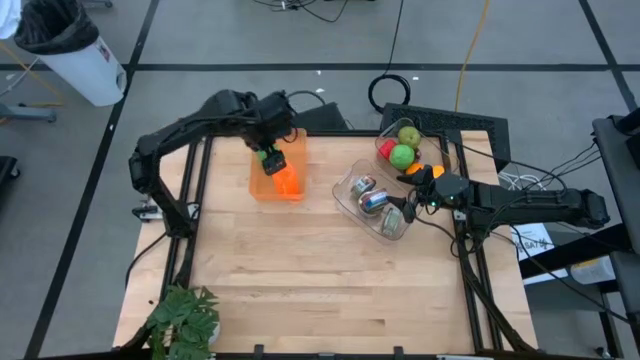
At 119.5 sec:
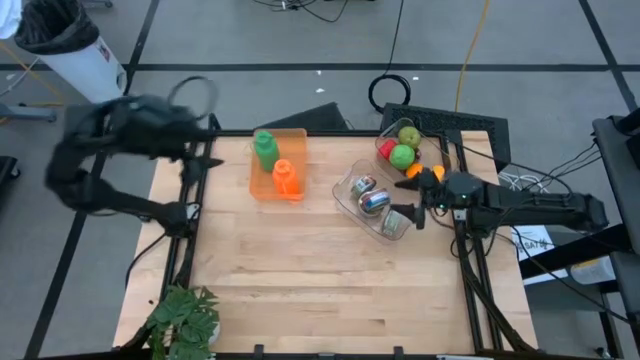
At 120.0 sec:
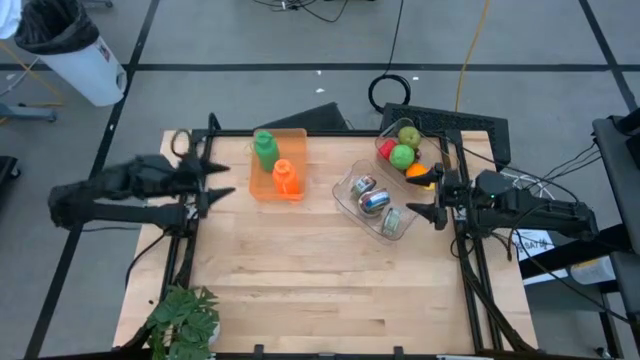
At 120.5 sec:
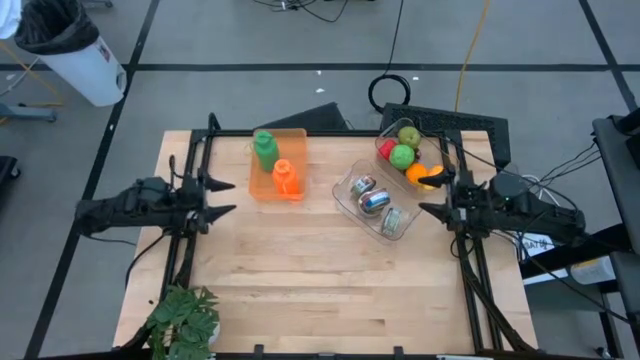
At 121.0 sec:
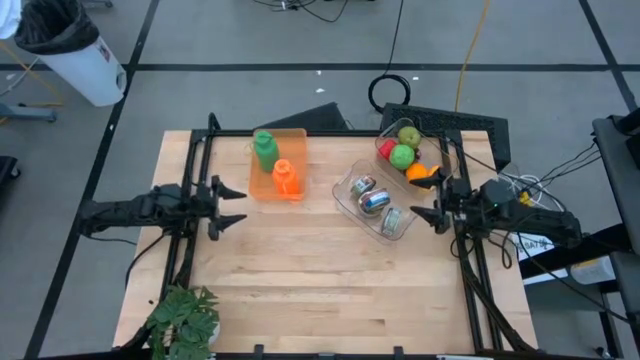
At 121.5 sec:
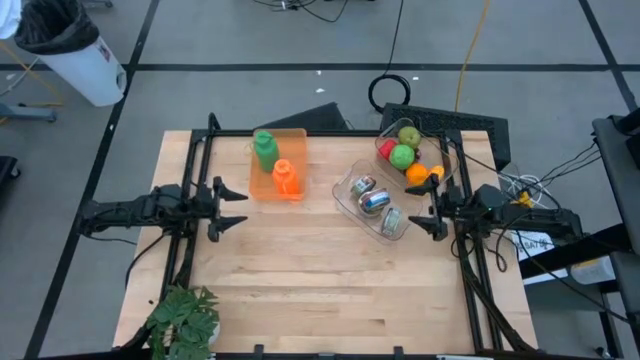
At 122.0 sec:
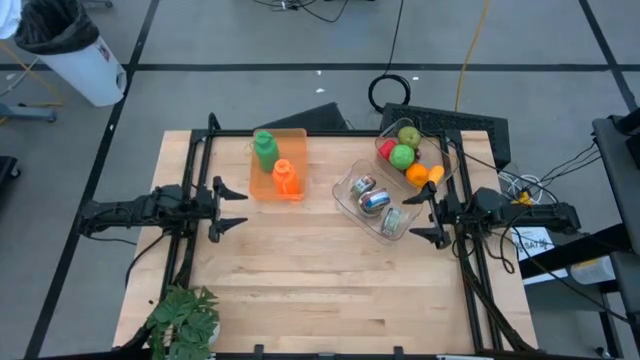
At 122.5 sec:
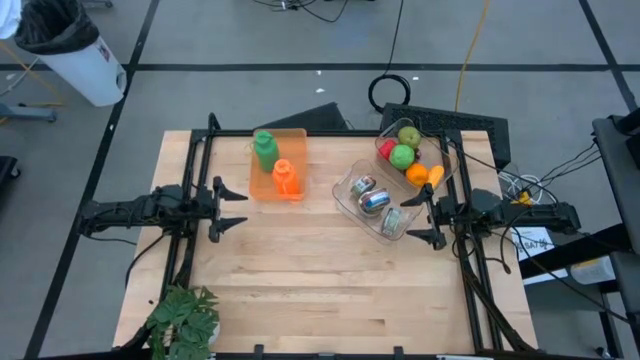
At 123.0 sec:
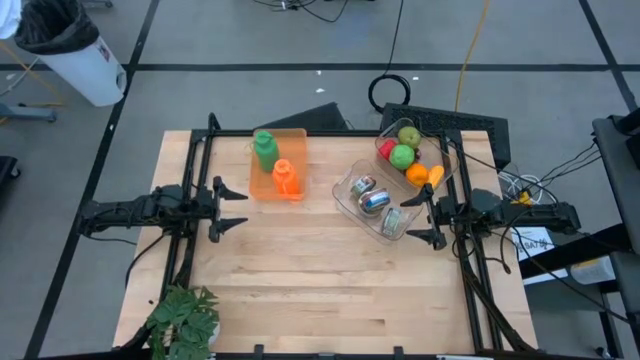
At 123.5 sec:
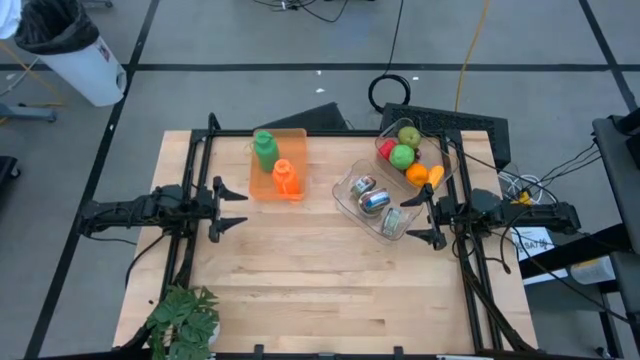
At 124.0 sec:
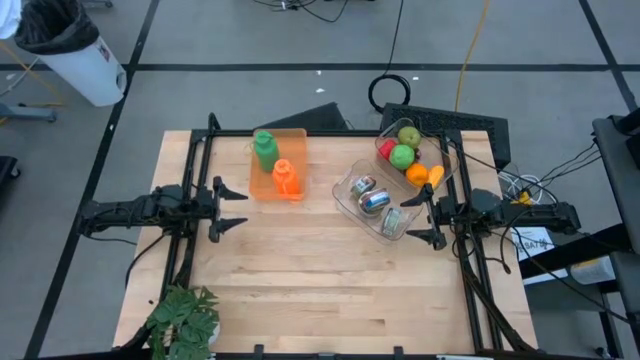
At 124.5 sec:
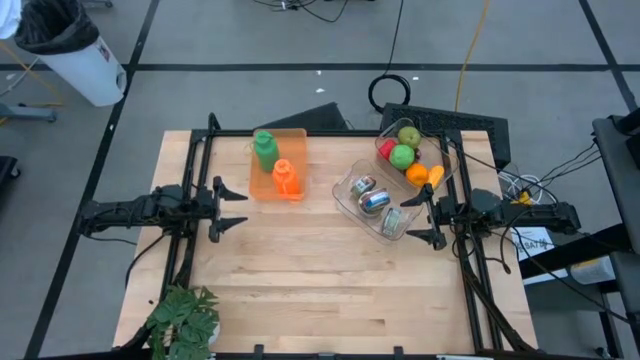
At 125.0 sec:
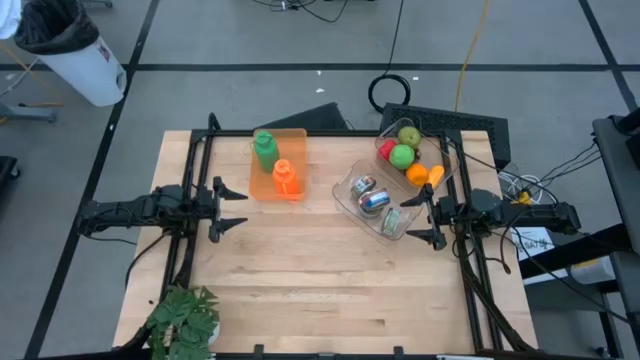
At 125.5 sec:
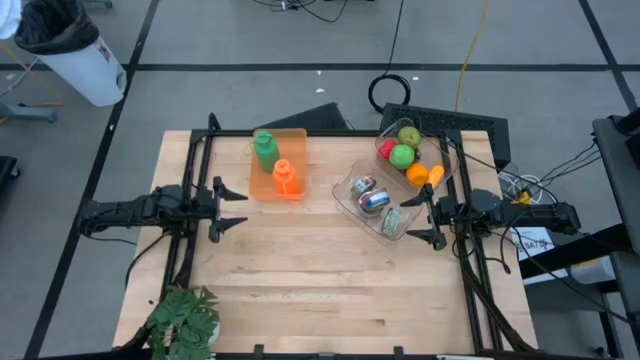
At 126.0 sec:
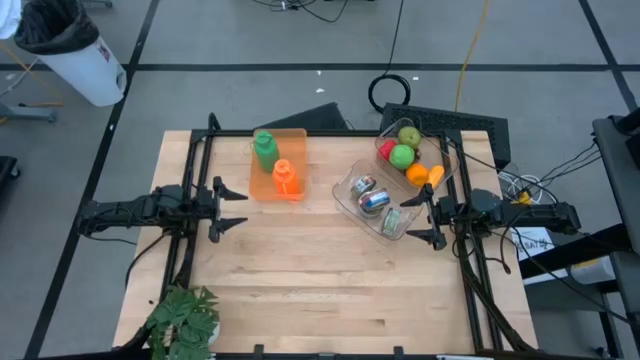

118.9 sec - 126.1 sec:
Task: Pick & Place Food Item
Return to Home Position

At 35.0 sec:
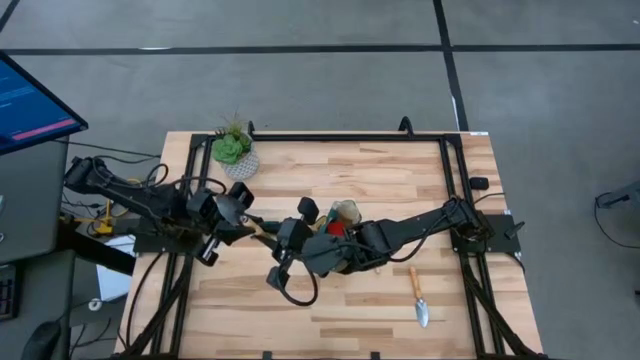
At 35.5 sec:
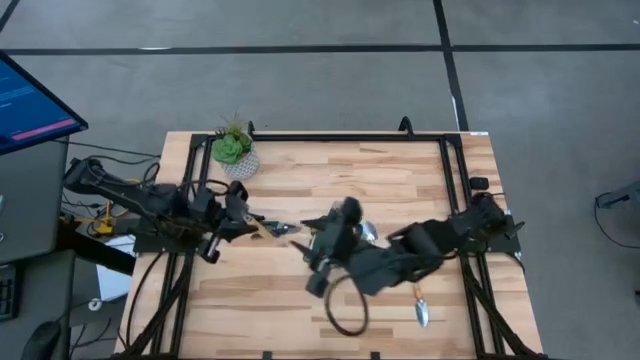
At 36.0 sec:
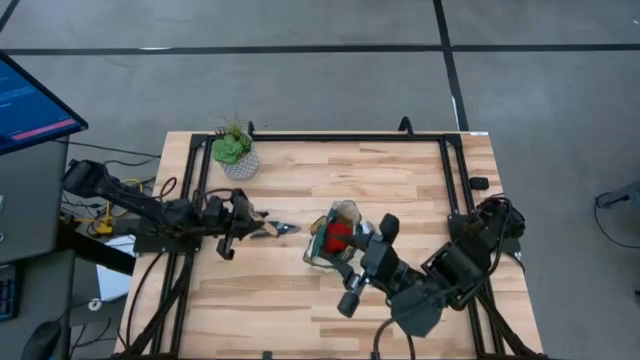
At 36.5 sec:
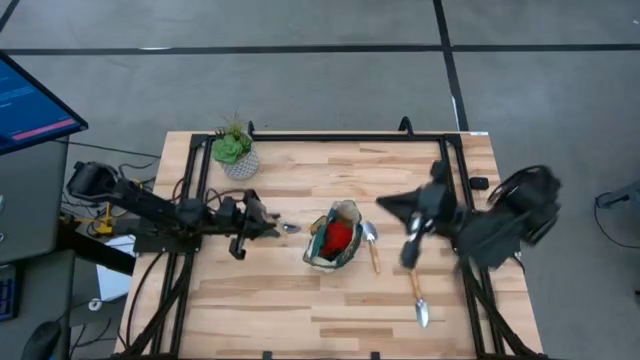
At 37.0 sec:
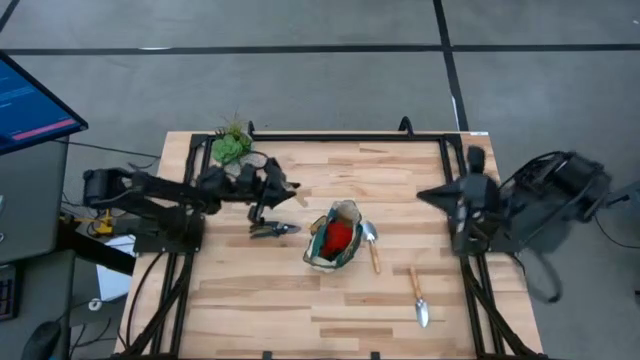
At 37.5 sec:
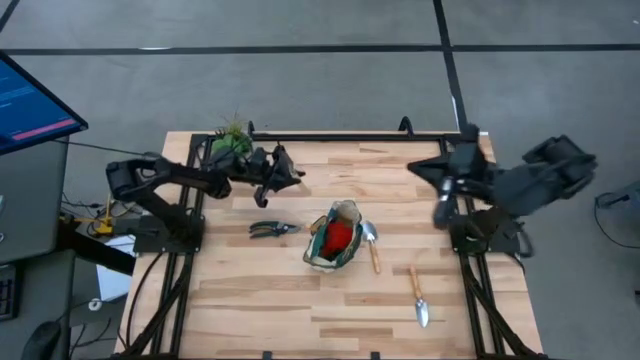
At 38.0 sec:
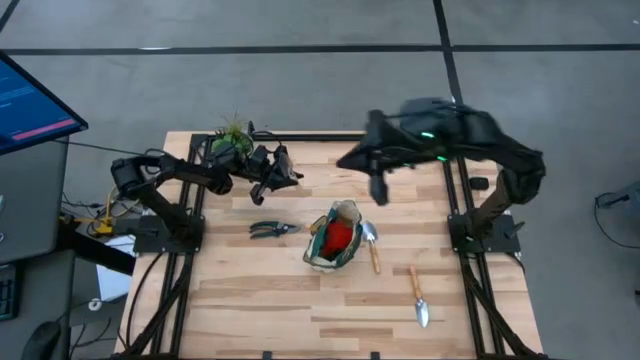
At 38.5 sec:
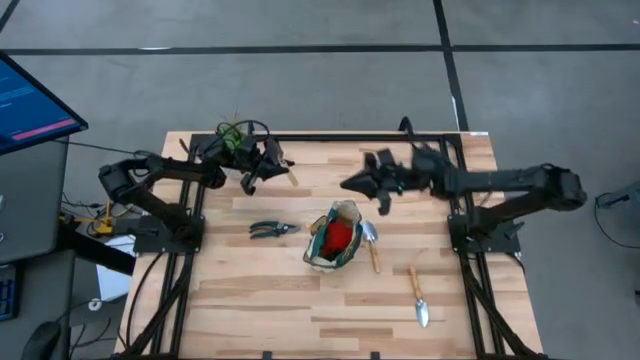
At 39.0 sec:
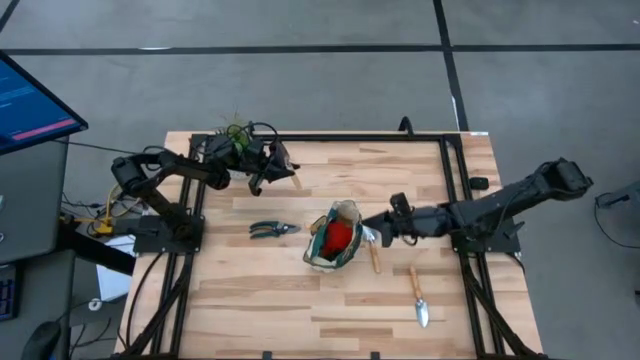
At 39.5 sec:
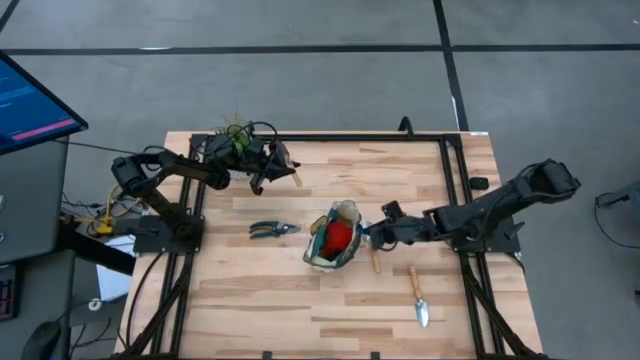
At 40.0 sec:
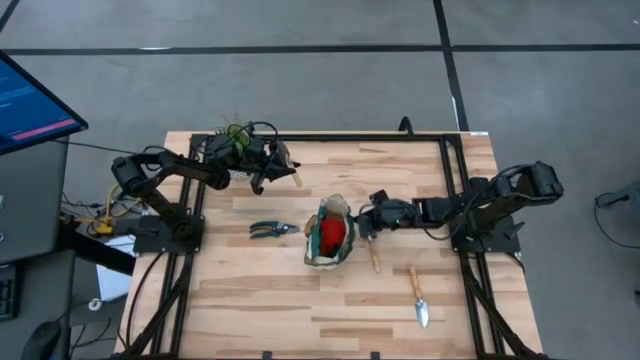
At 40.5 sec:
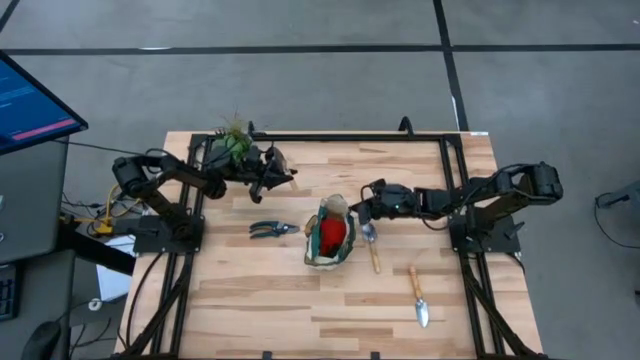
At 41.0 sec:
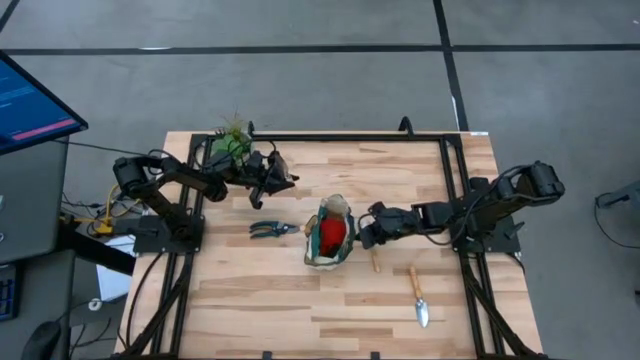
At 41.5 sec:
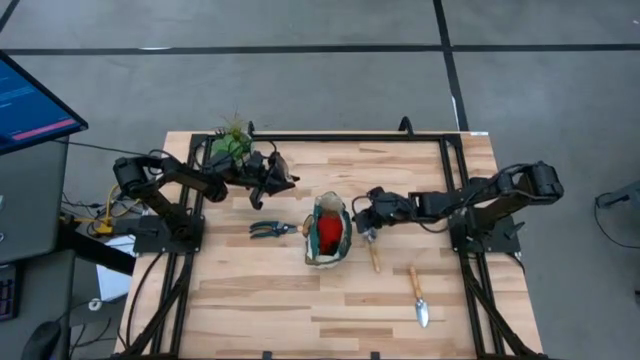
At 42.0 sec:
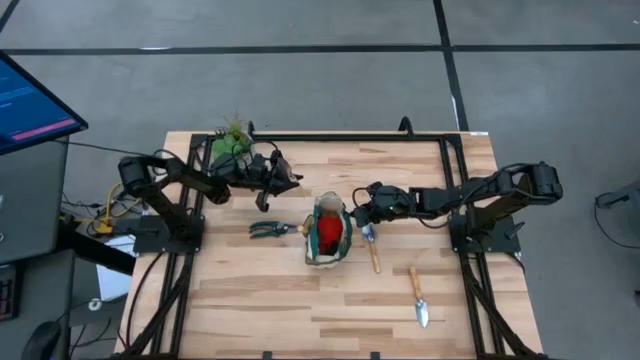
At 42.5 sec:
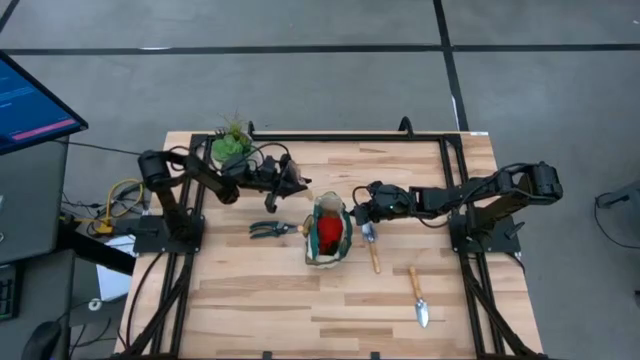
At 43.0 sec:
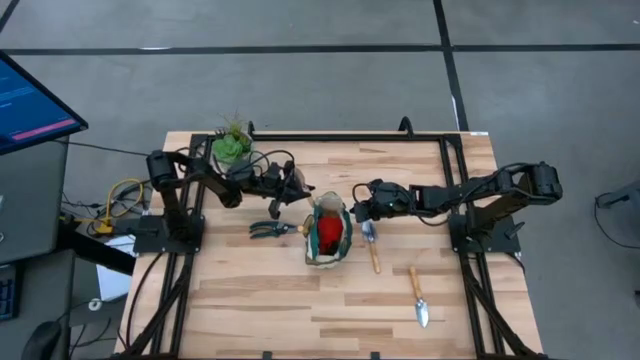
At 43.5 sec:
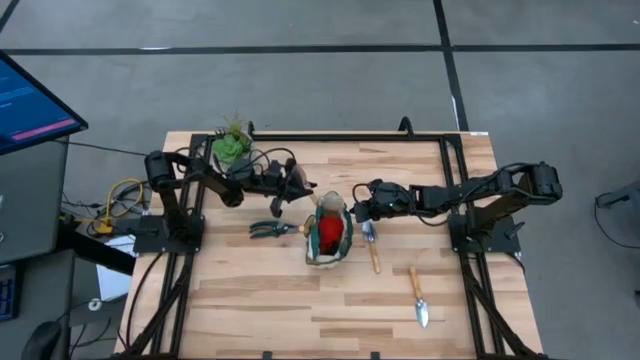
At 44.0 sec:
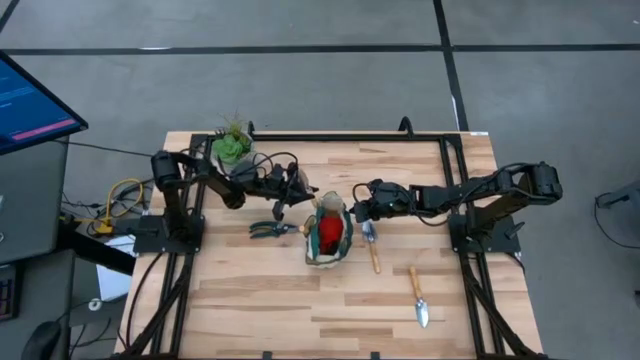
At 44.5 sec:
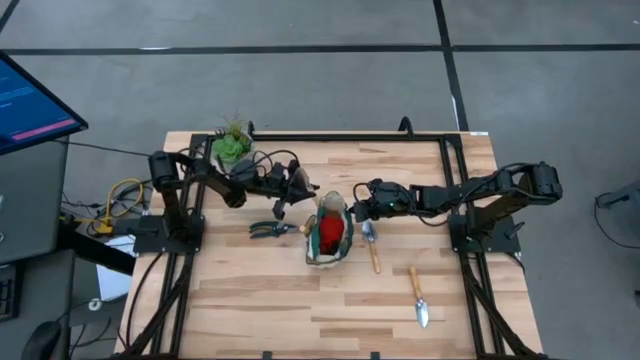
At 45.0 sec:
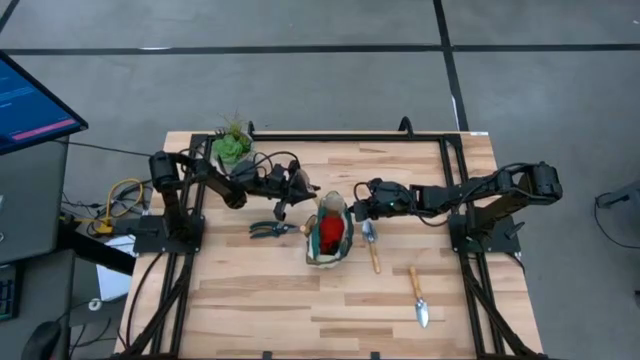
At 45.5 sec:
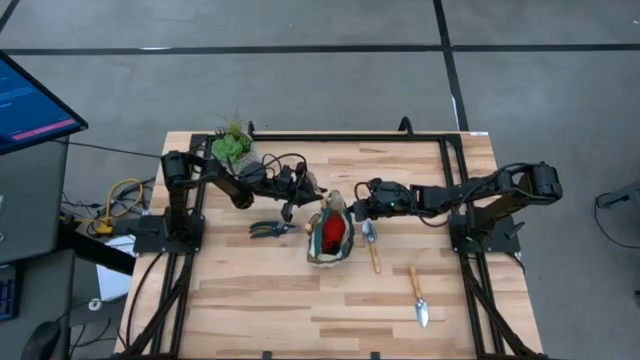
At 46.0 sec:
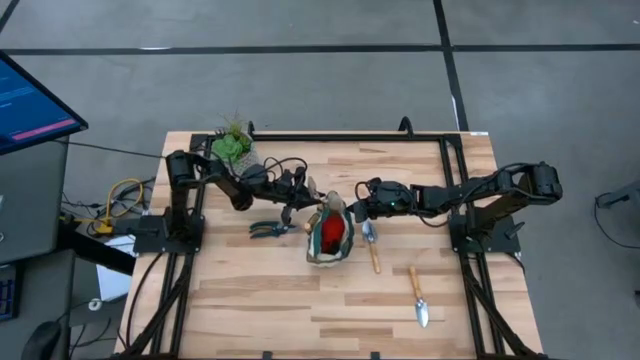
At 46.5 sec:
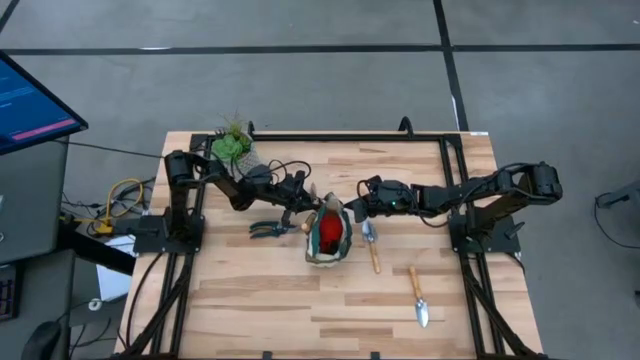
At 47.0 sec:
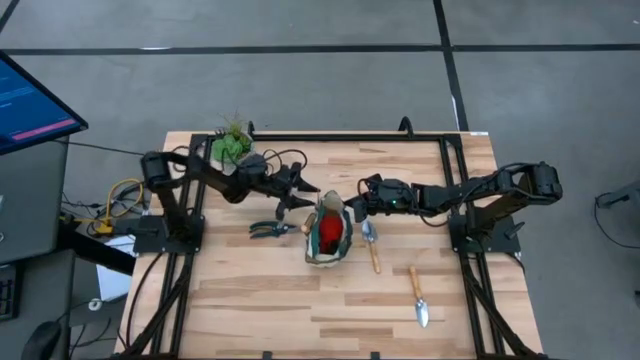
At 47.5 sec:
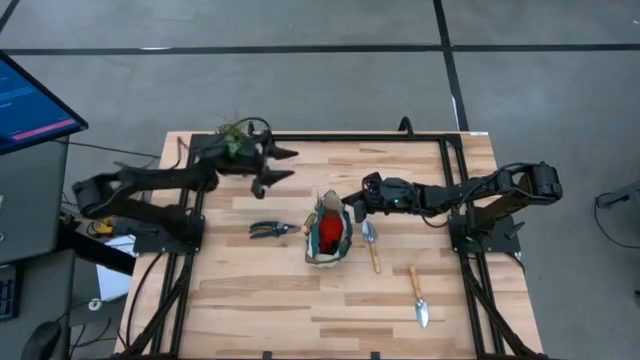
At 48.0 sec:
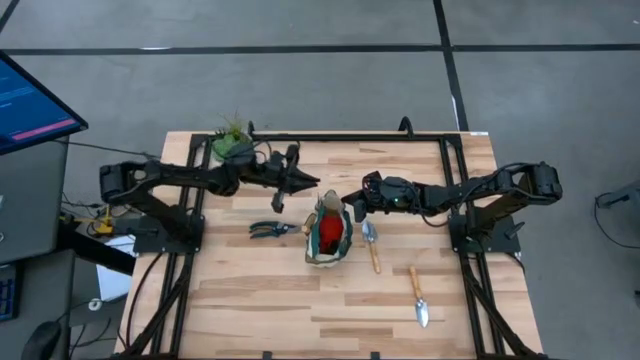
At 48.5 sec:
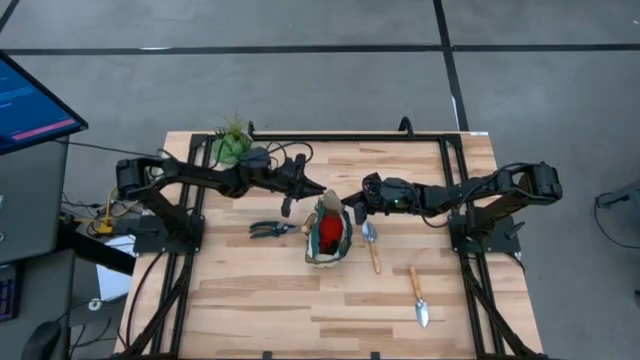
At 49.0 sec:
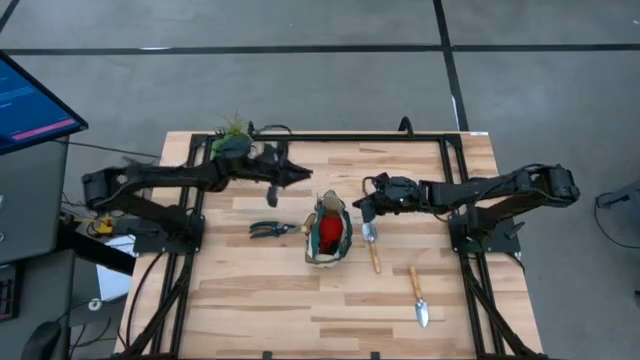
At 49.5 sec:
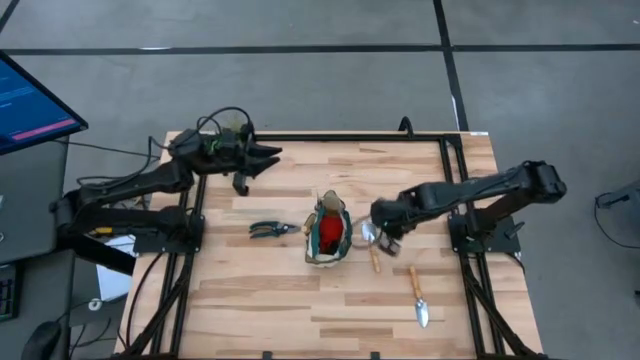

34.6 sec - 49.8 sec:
Task: Pick & Place Garden tools in Gardening bag
Put the trowel into the gardening bag
